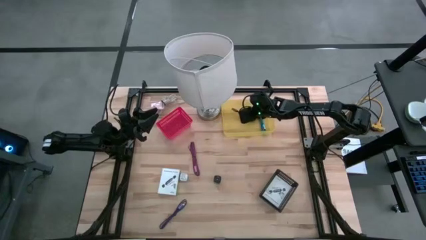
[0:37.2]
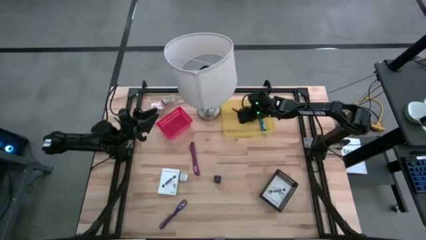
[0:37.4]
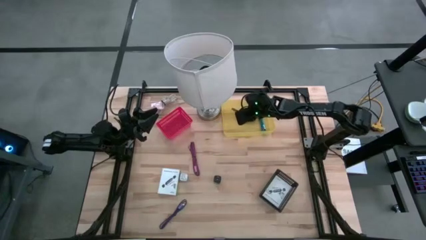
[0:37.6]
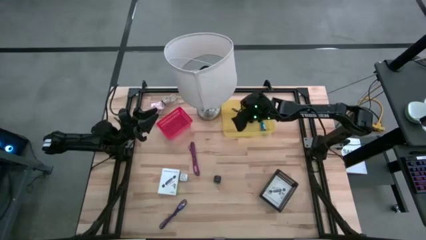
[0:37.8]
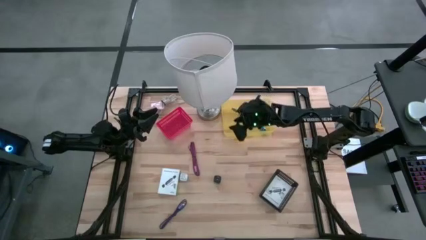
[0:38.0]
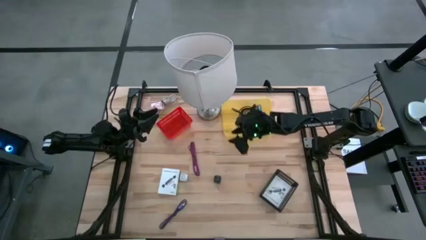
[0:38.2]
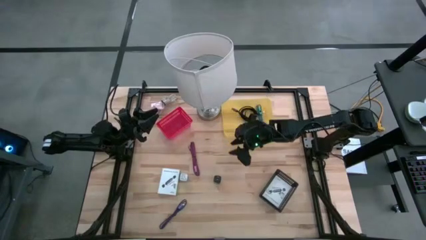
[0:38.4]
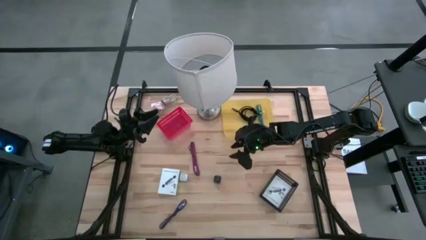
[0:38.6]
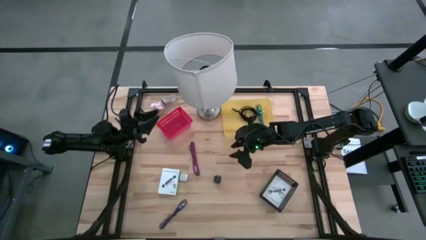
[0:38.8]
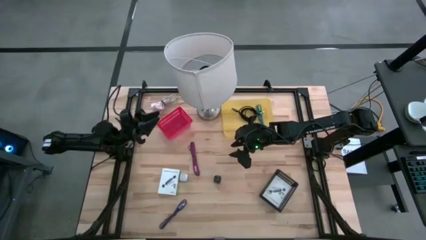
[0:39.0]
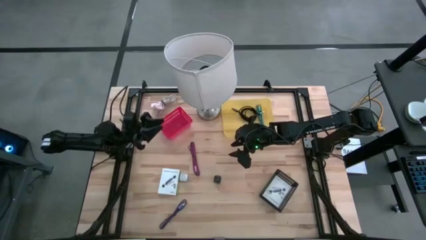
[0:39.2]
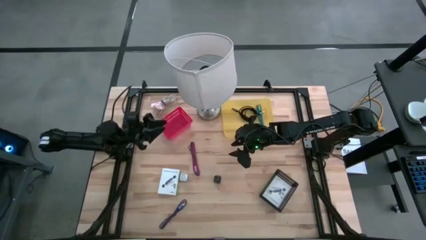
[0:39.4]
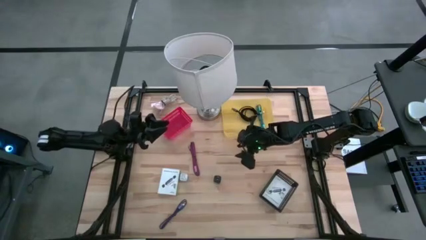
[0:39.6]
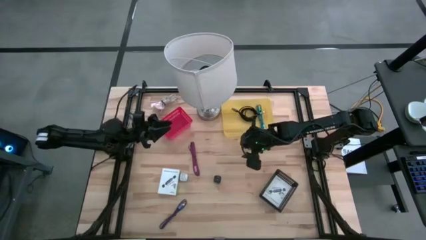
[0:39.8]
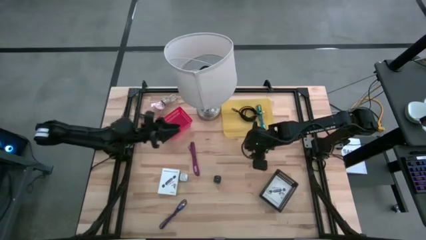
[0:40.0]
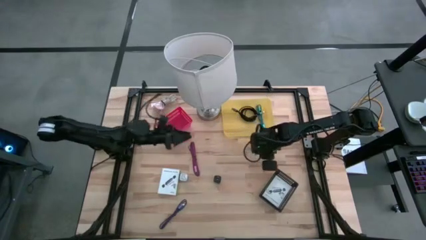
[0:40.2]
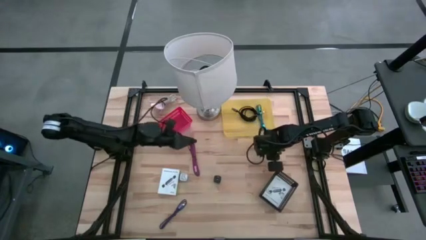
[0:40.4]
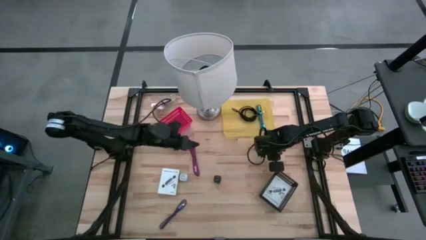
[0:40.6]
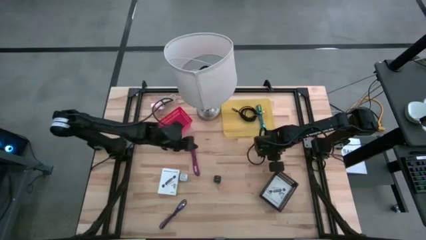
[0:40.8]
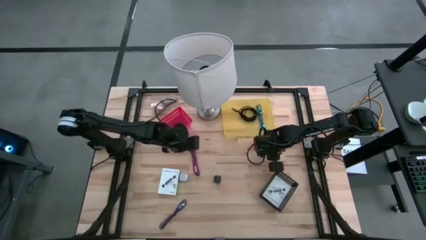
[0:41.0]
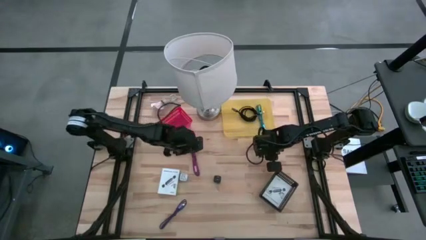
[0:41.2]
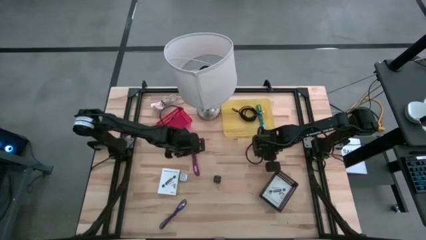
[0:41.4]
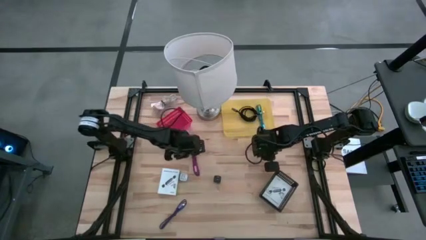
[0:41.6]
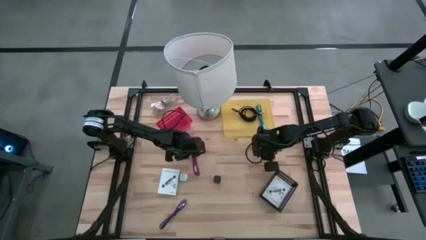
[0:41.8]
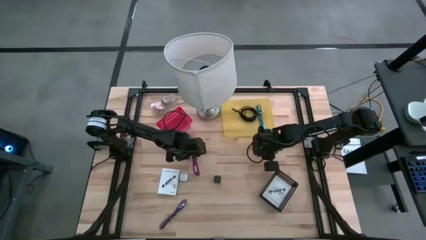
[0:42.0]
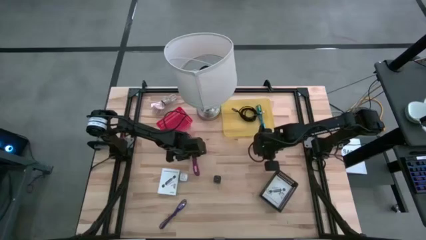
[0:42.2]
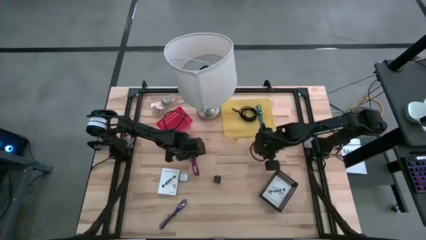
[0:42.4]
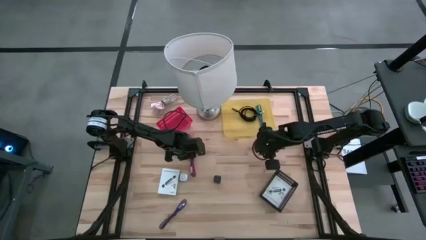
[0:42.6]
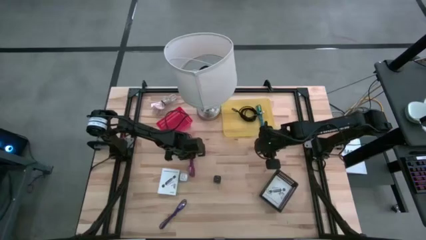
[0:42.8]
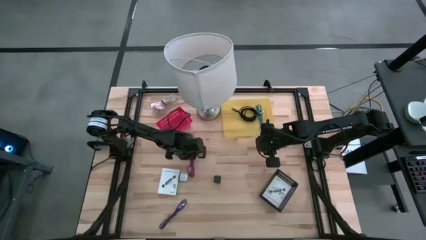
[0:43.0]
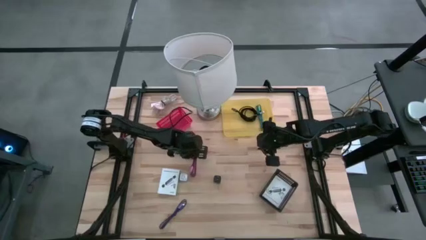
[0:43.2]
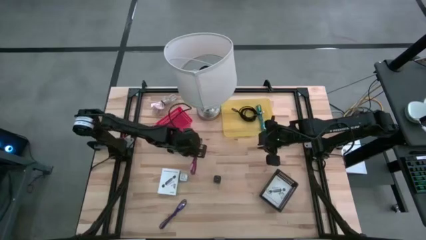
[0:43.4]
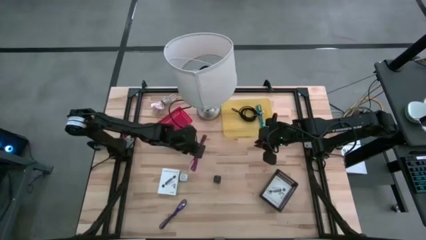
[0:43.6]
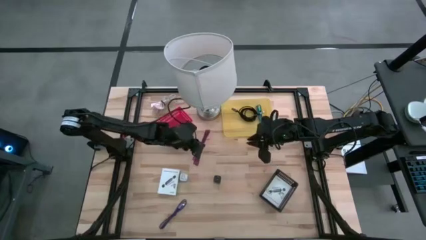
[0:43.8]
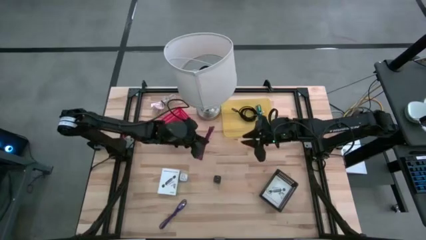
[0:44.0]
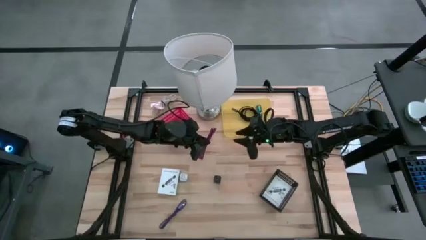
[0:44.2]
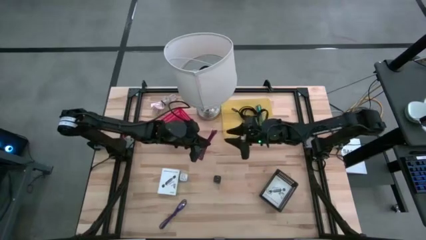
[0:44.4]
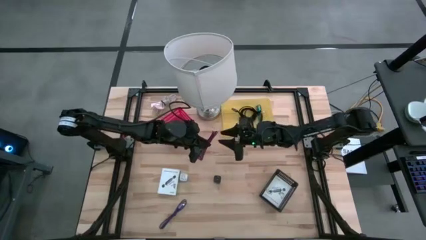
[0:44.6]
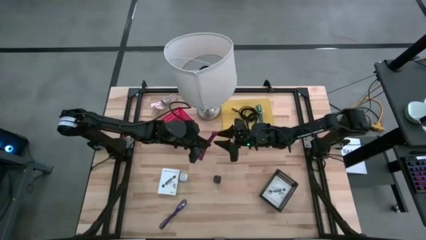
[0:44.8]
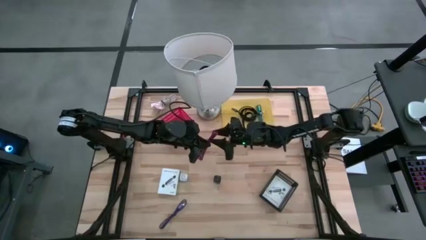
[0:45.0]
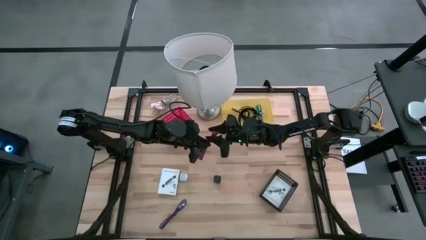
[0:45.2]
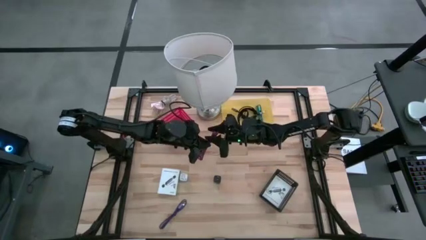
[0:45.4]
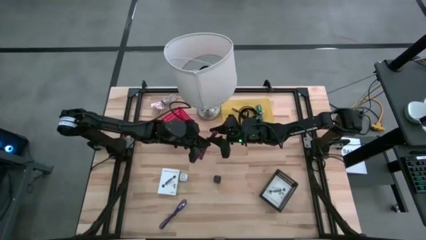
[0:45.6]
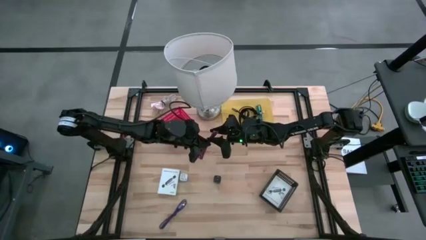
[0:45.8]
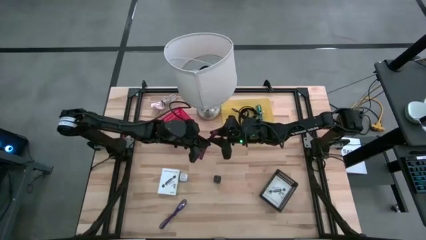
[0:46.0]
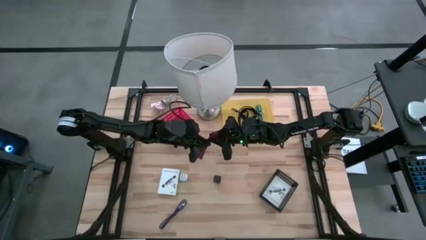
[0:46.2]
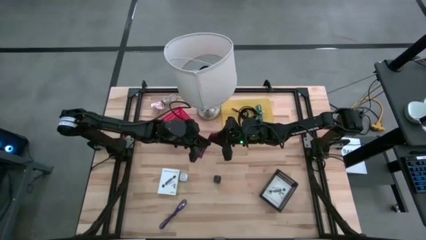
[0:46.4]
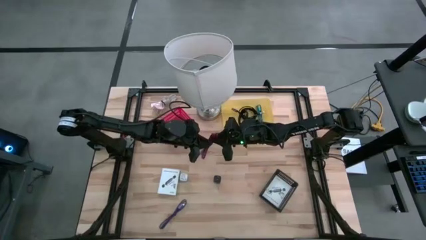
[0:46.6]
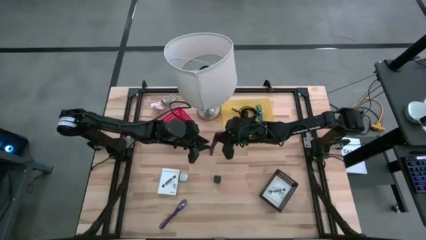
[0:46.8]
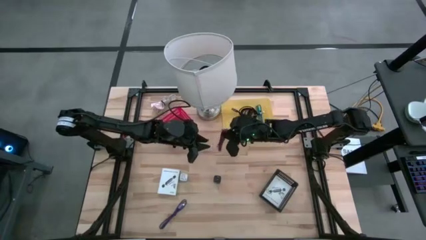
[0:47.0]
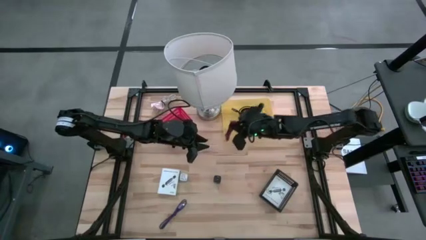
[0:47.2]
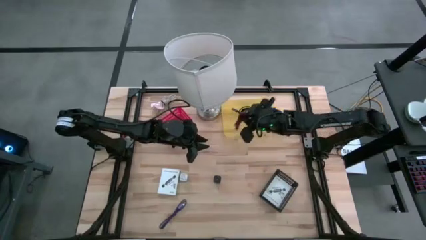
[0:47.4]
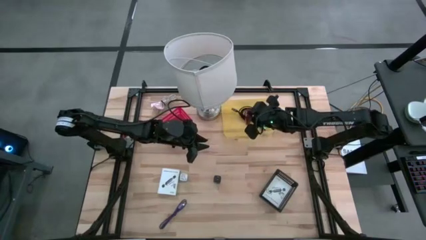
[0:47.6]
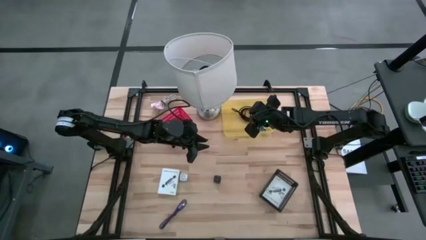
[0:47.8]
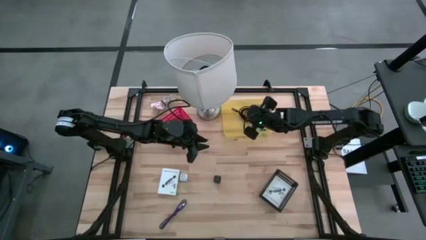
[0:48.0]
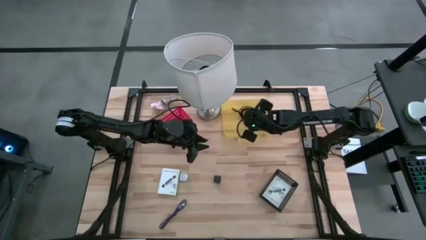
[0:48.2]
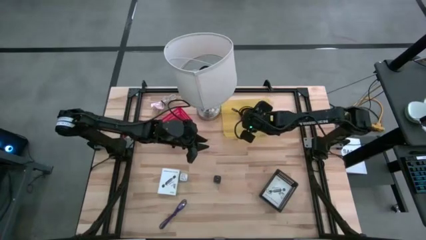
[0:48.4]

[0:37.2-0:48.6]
Task: Pick and place items into bin
Put the pink charger cable into the yellow bin

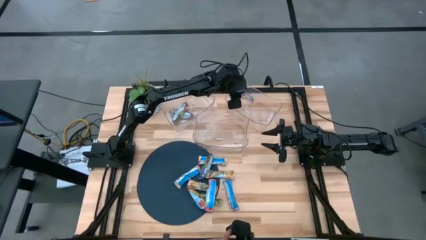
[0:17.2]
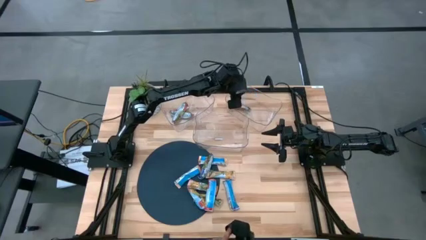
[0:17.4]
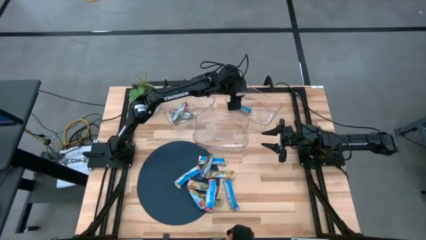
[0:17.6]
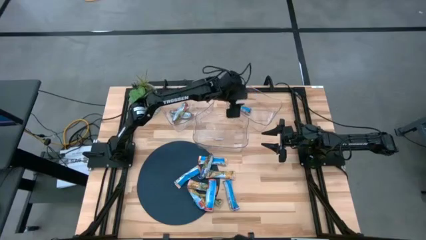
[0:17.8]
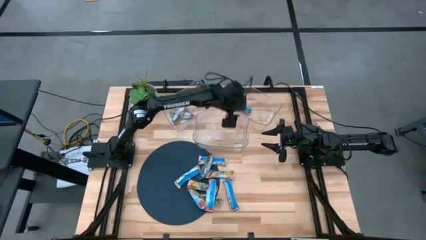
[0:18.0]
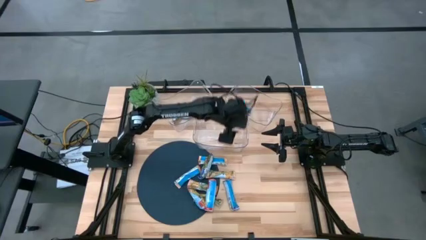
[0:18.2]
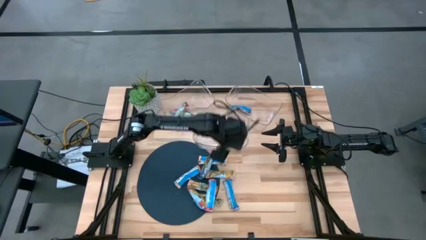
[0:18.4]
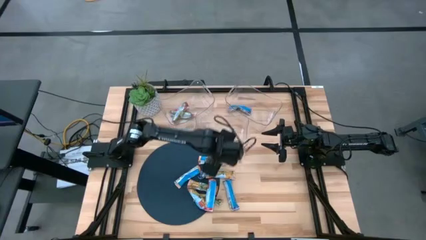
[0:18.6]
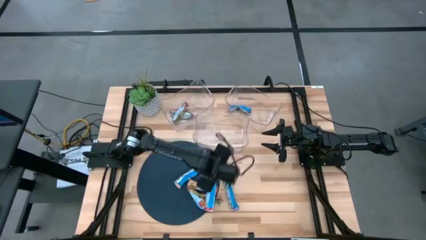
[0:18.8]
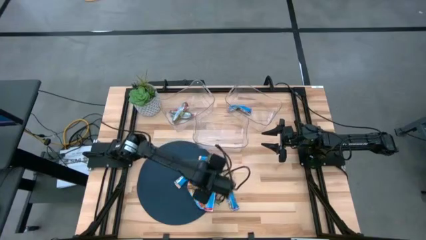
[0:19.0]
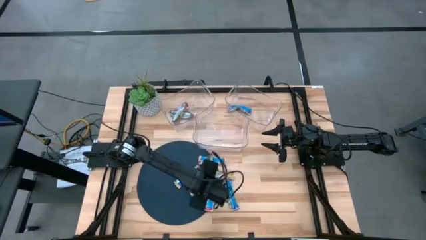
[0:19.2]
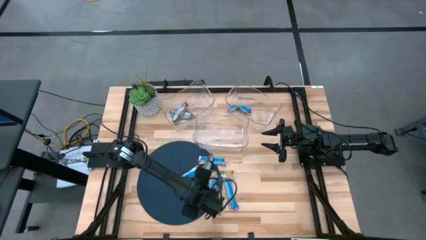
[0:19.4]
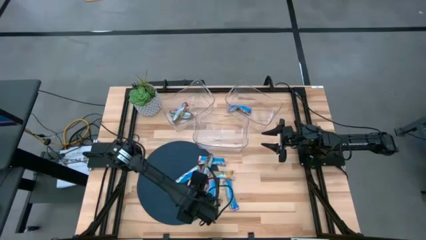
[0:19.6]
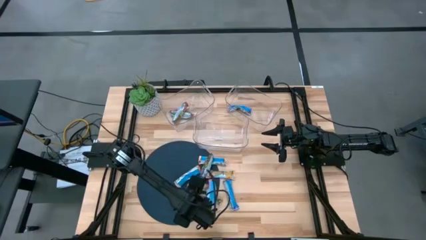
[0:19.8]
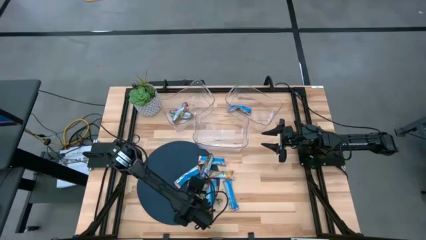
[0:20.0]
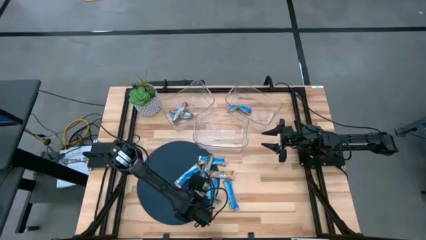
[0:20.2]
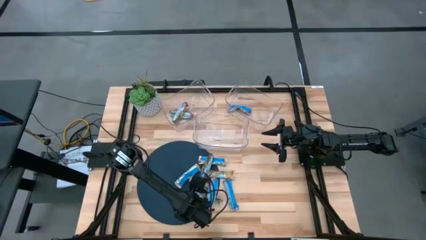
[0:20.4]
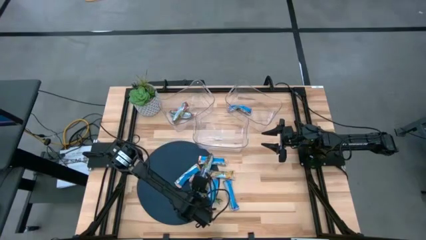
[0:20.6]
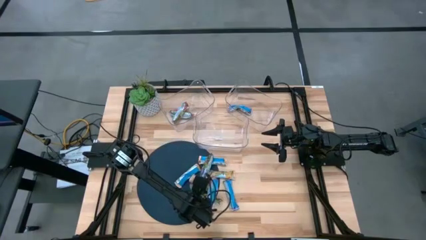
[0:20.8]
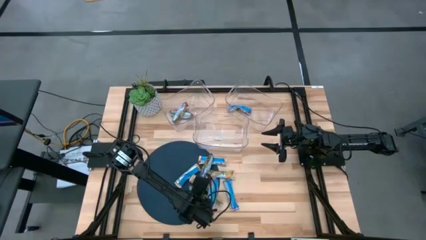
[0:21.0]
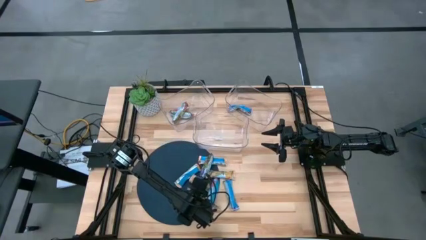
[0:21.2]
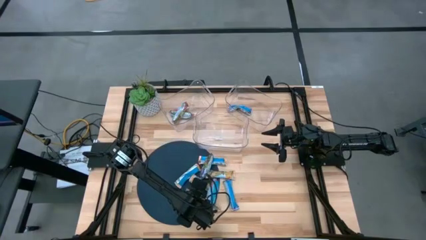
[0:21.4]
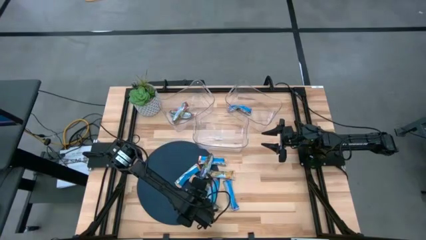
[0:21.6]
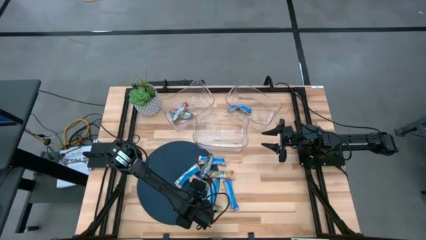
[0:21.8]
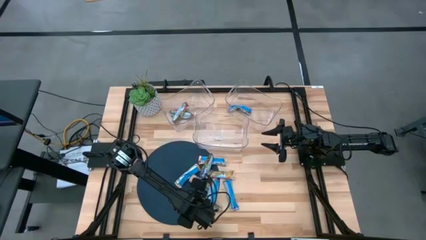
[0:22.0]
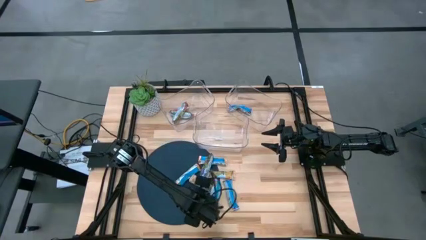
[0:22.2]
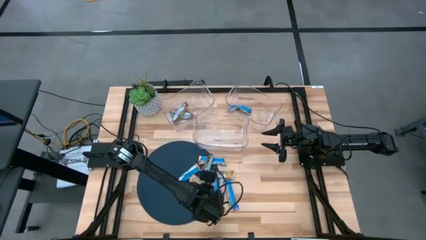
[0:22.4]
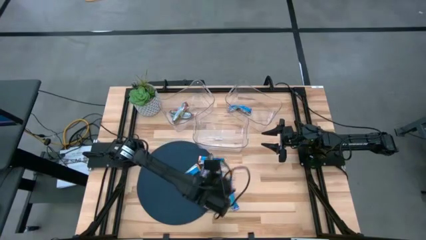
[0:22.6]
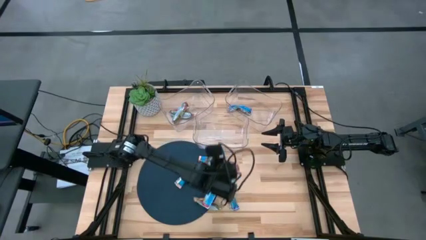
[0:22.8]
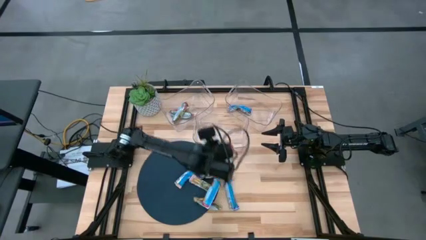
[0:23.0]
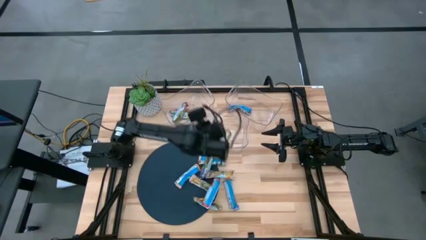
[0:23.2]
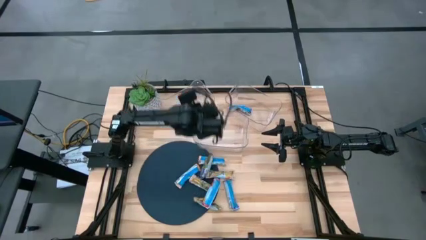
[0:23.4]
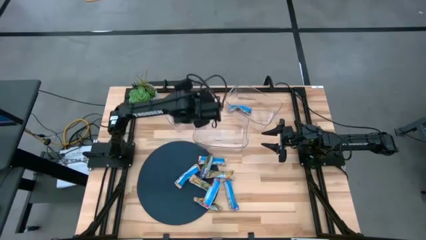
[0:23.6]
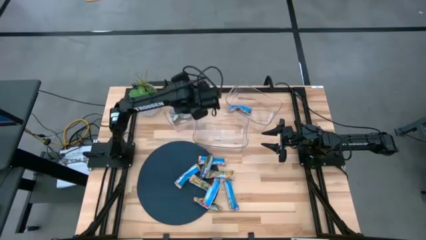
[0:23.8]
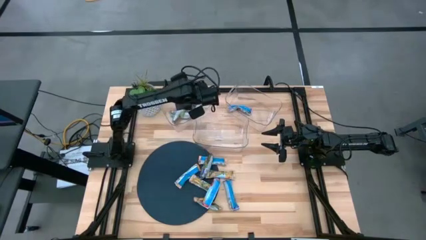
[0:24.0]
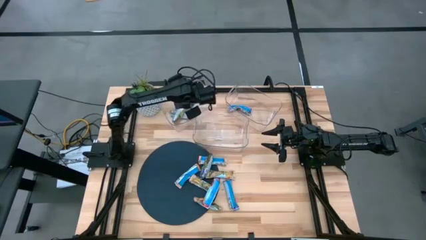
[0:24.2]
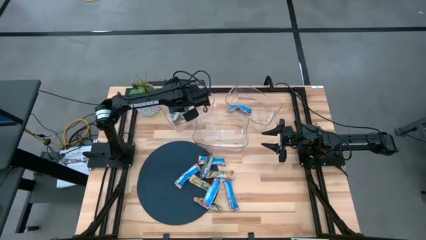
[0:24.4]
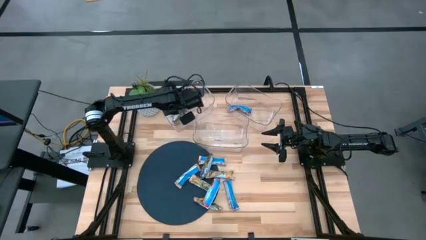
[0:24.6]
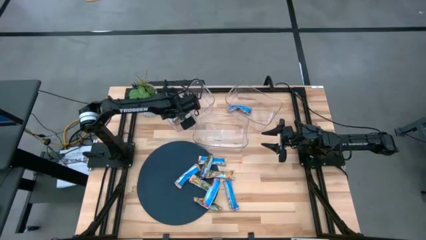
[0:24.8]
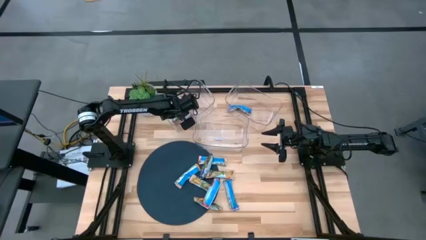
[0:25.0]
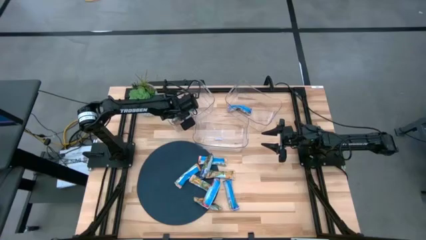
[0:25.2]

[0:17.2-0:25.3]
Task: Pick and place Granola Bars by type
Put the red granola bar into the left transparent bin
